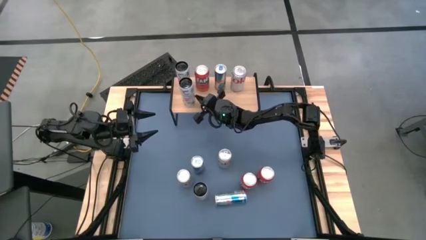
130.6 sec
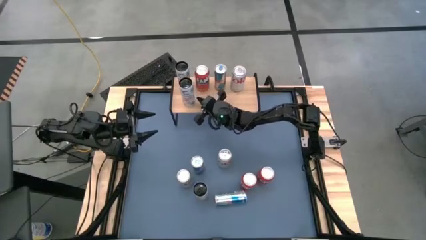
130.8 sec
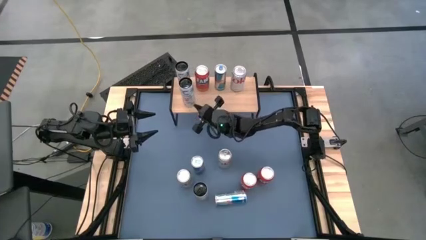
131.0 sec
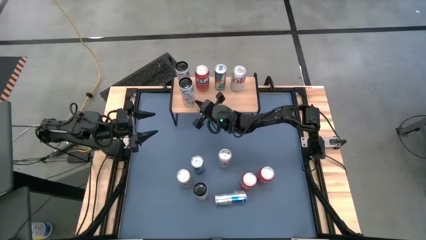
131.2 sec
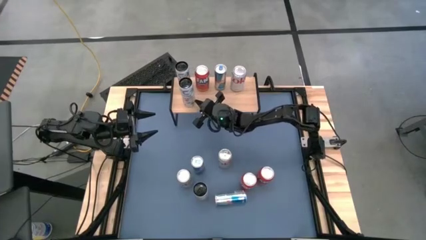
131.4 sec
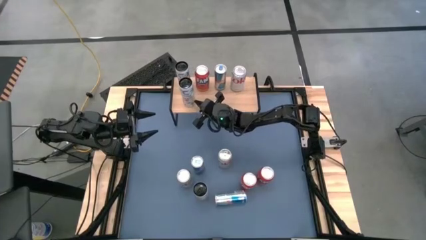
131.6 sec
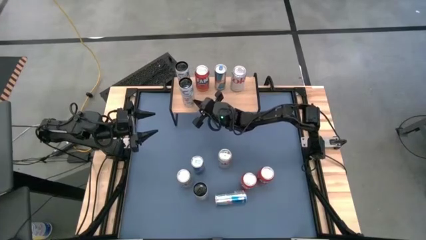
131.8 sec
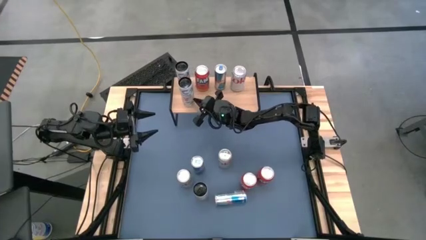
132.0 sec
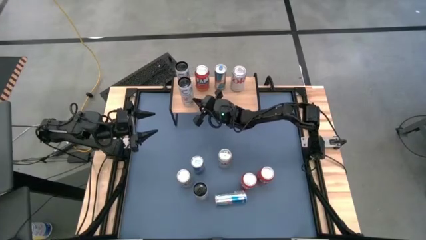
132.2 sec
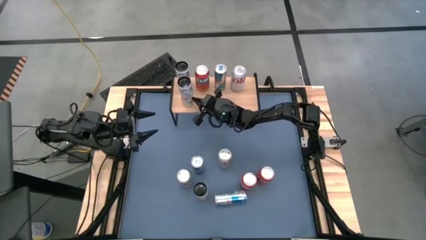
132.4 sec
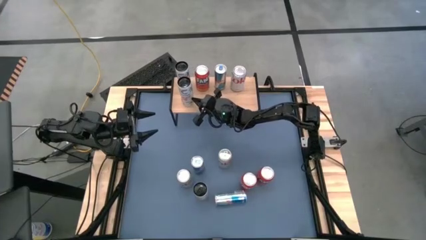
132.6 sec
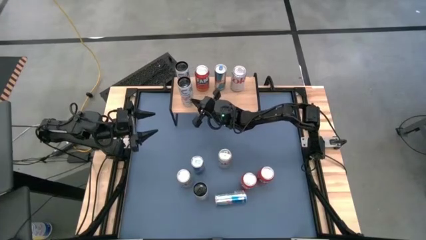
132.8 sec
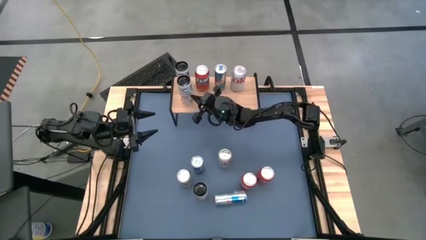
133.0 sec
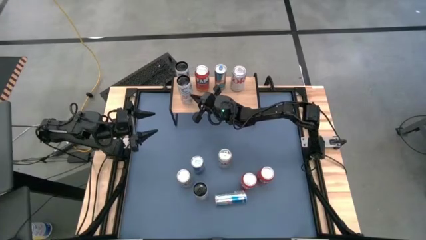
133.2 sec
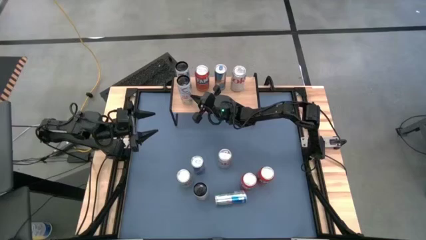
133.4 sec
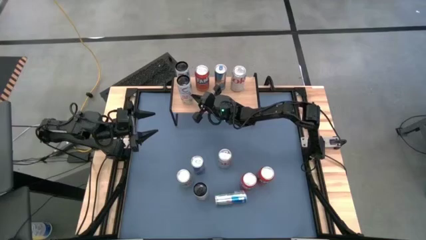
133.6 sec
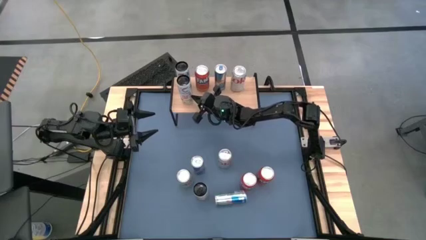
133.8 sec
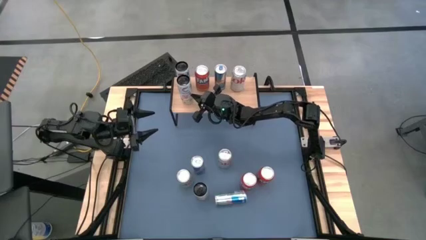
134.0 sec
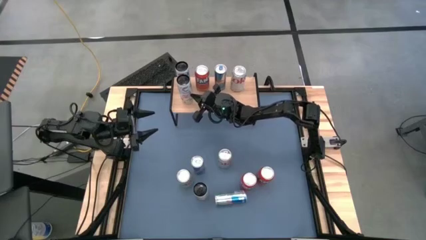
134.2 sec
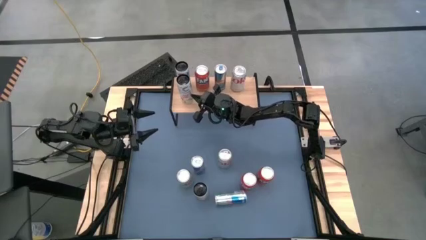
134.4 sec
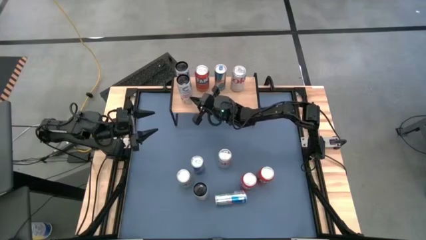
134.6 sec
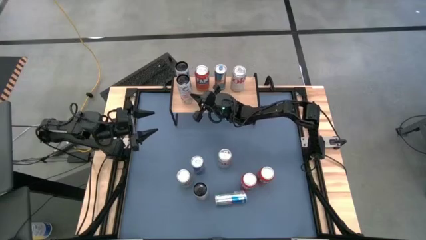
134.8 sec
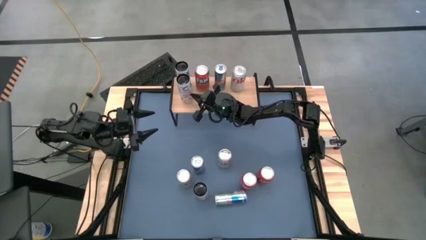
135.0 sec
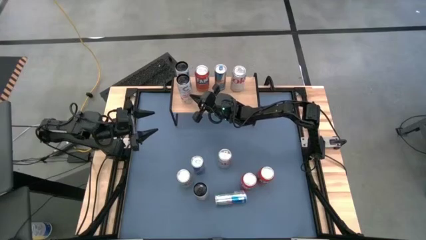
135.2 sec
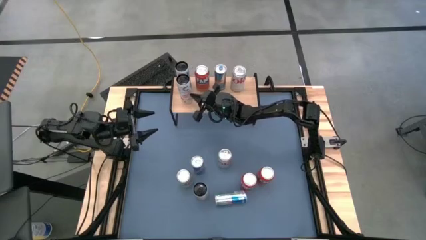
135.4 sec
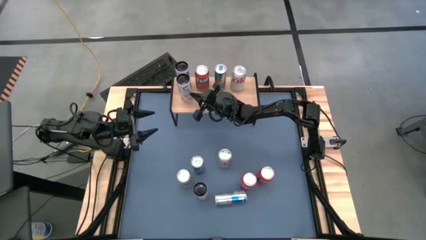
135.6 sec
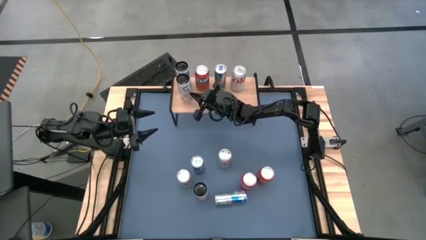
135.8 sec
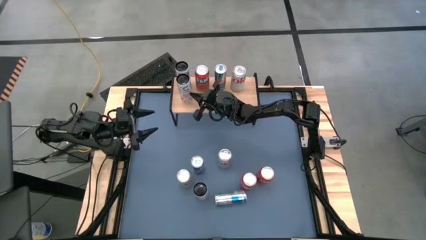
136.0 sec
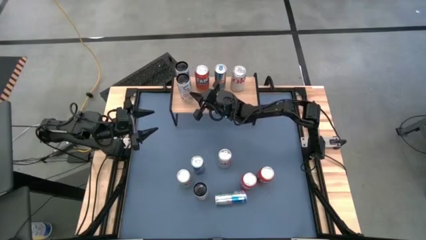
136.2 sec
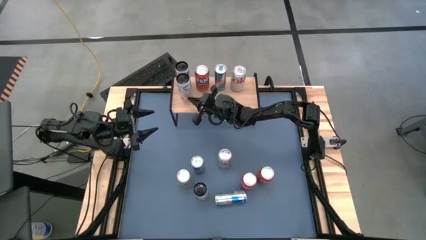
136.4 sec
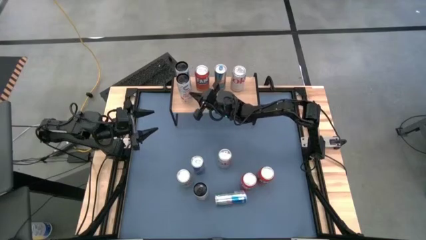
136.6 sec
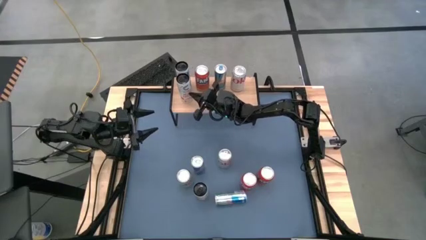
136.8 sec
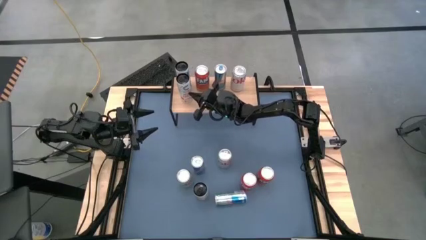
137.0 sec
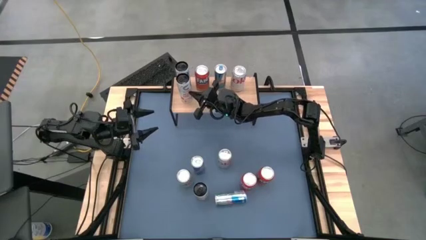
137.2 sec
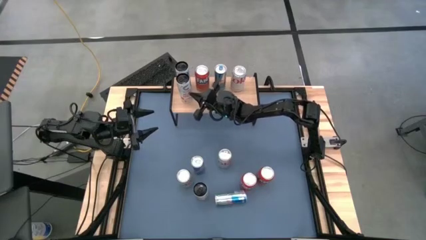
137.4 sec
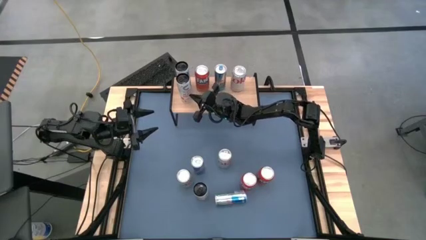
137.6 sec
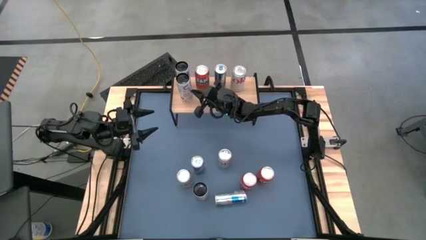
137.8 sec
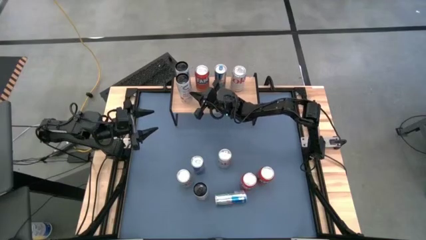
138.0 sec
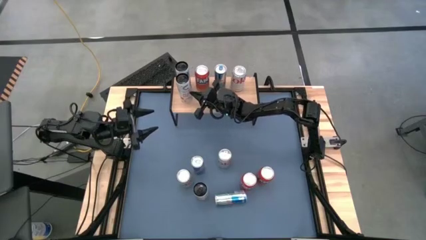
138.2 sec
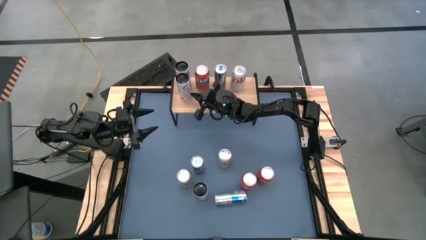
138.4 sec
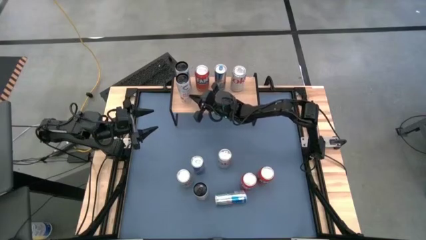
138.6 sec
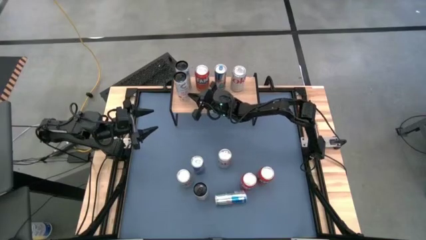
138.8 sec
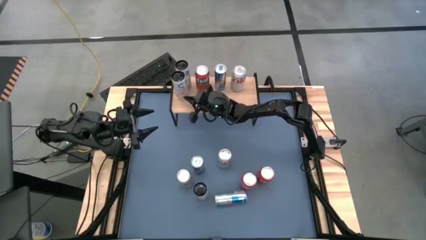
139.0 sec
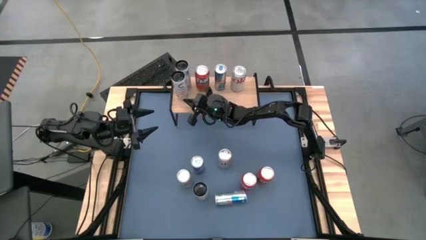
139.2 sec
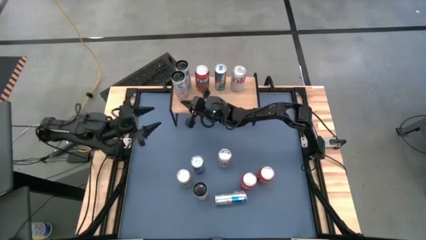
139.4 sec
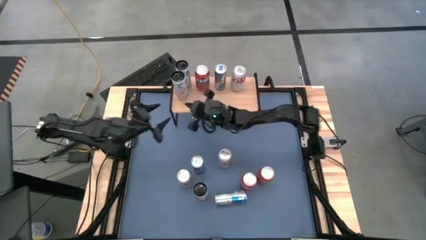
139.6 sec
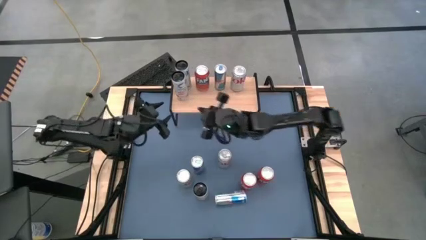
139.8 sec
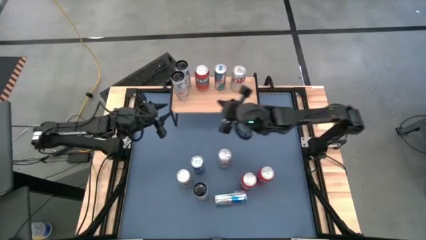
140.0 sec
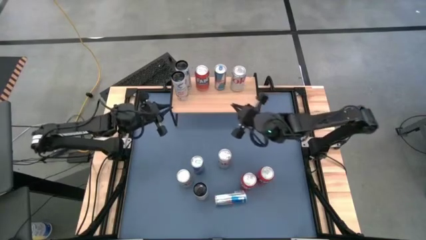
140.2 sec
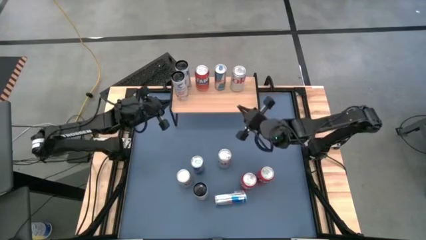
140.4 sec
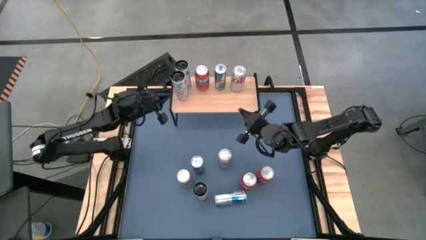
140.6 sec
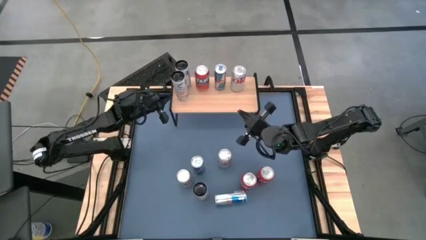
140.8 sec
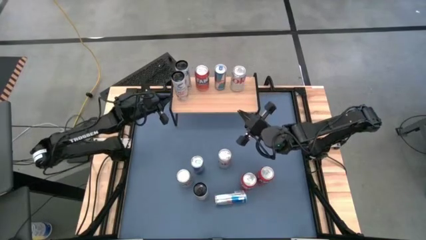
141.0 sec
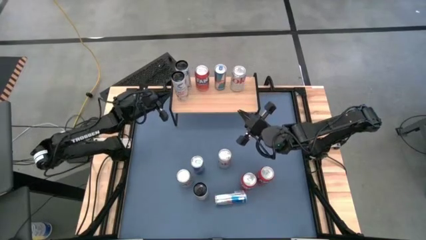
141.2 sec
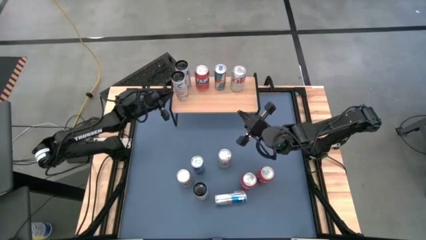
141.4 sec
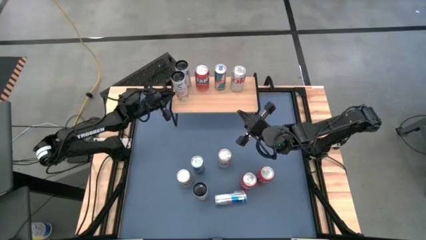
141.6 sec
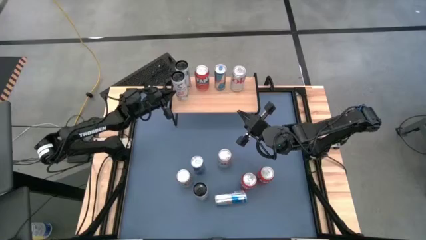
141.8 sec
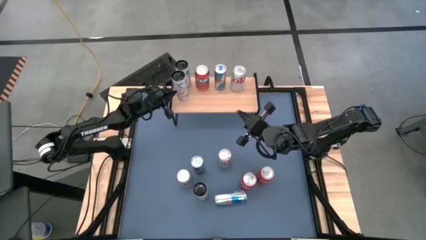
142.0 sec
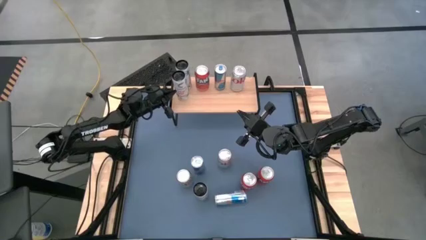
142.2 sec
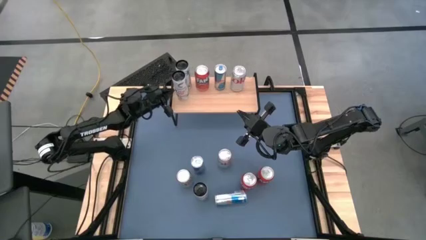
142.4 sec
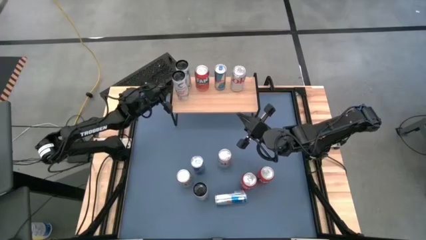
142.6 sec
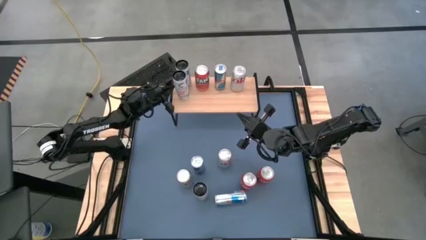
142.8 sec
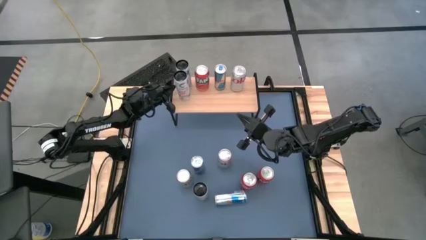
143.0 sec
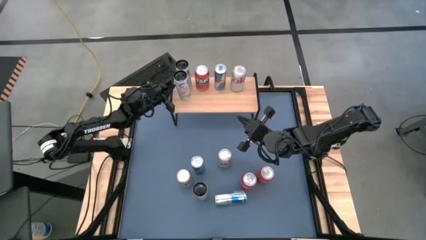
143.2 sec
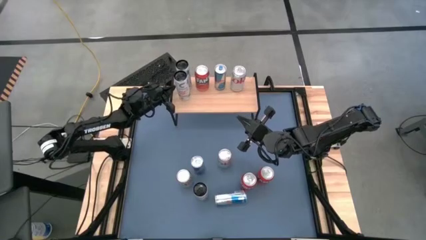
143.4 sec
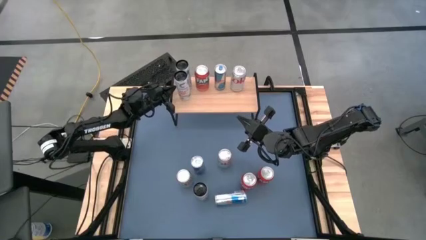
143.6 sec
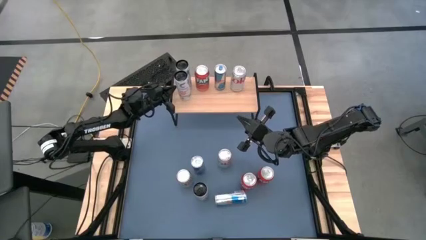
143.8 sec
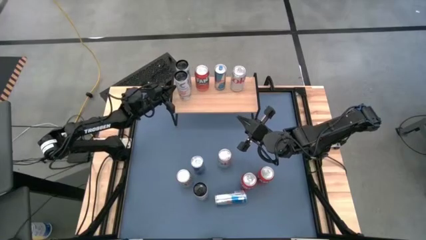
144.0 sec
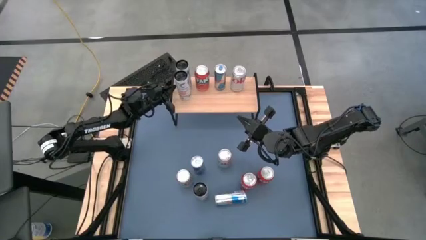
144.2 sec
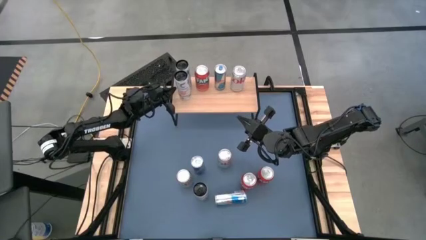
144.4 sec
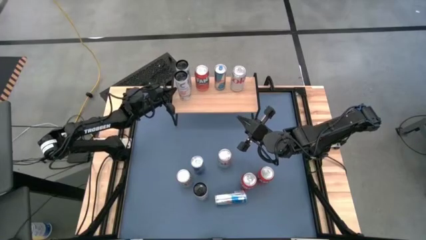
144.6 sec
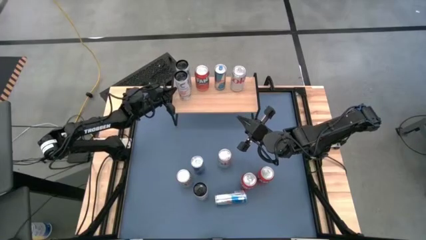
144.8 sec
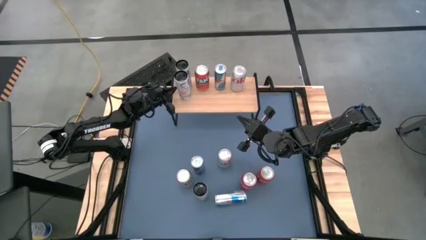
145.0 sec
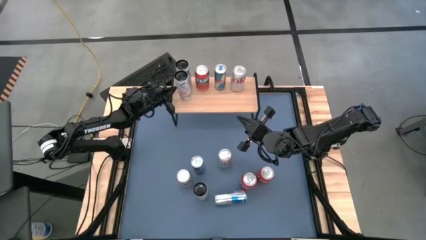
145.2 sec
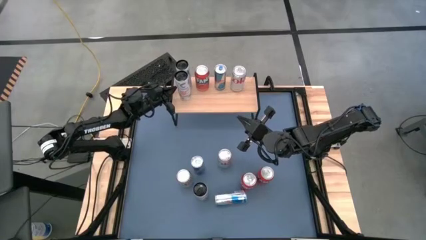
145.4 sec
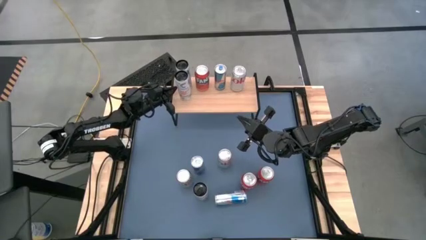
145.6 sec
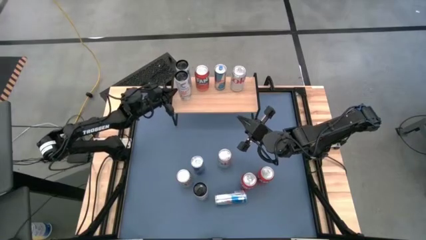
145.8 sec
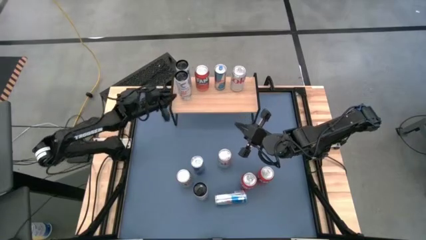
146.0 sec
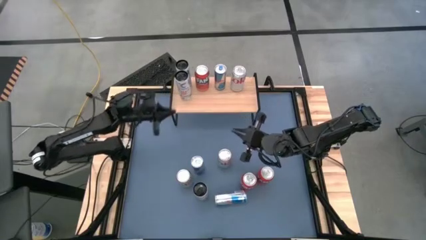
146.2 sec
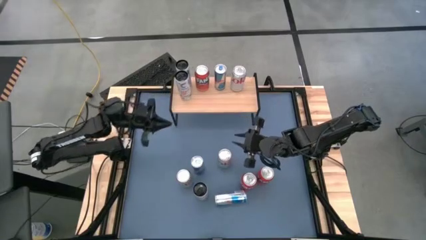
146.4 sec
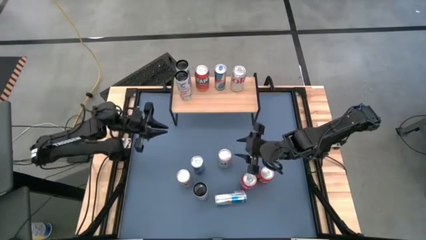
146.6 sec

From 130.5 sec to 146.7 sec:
Task: Place canned beverage on shelf
Adjust the black soda can
